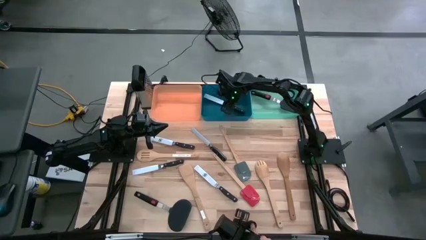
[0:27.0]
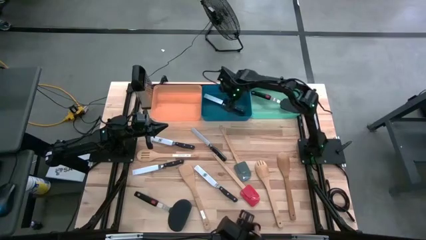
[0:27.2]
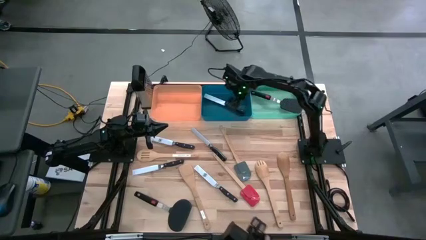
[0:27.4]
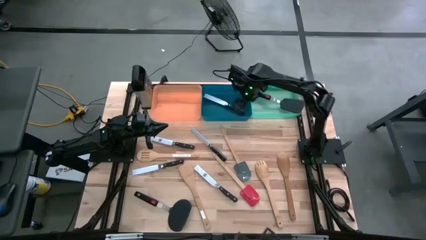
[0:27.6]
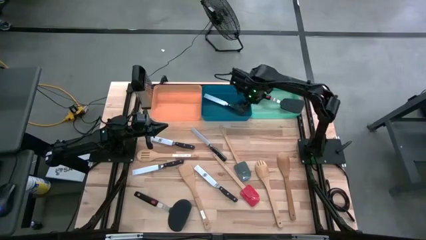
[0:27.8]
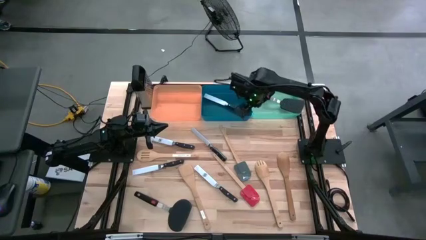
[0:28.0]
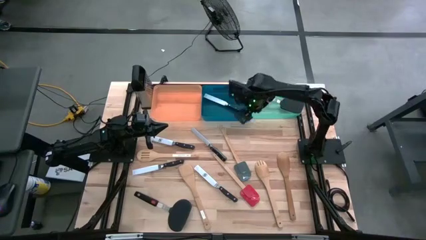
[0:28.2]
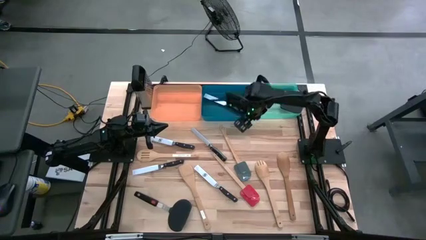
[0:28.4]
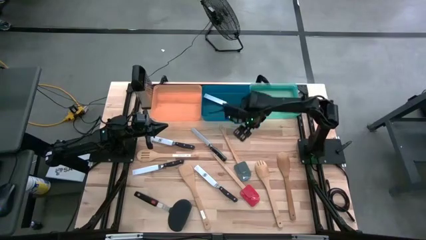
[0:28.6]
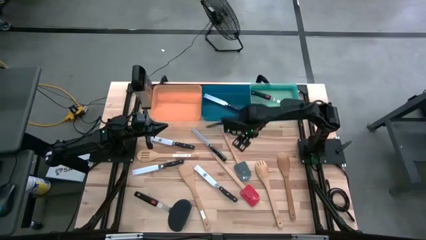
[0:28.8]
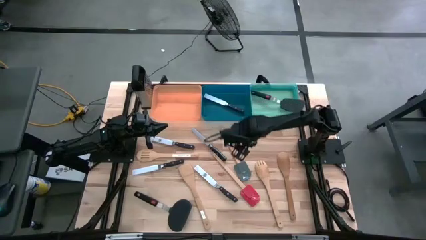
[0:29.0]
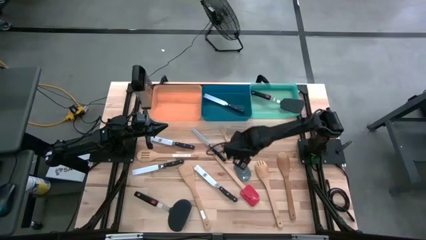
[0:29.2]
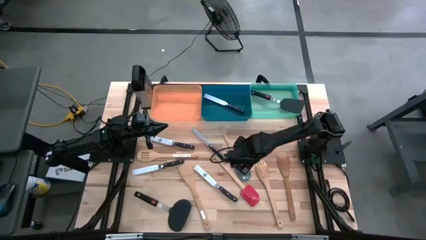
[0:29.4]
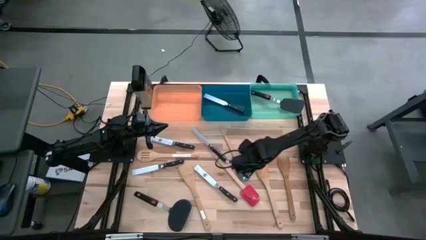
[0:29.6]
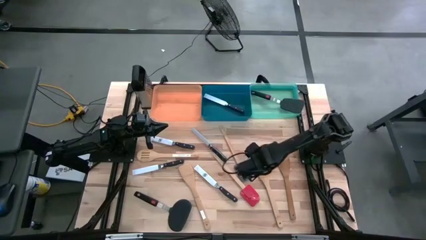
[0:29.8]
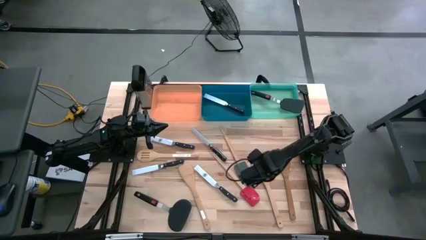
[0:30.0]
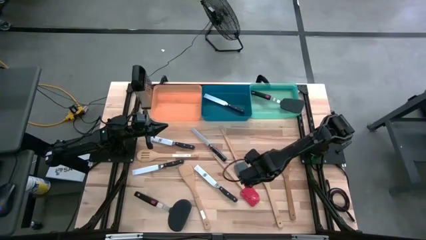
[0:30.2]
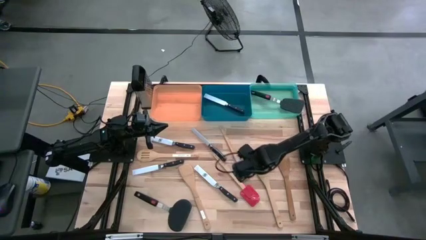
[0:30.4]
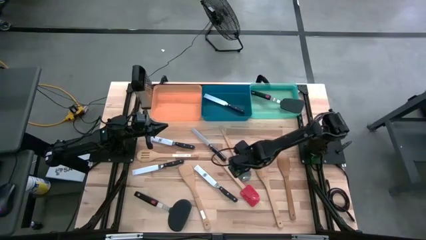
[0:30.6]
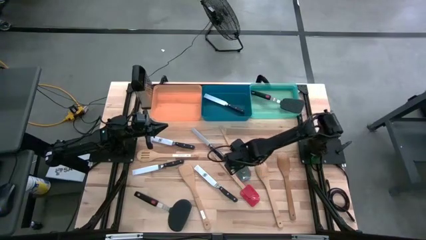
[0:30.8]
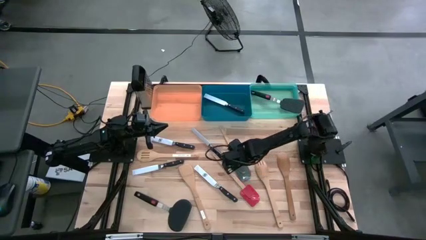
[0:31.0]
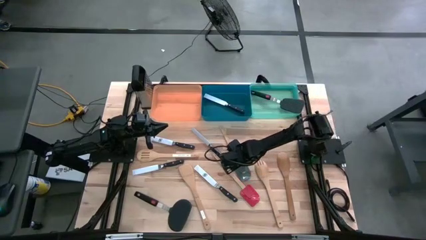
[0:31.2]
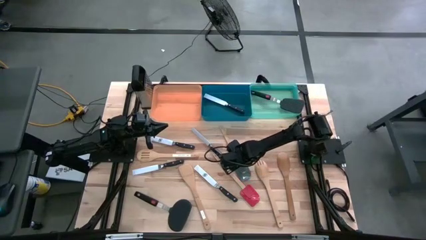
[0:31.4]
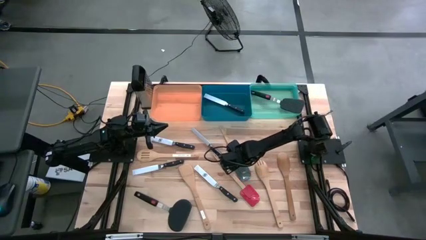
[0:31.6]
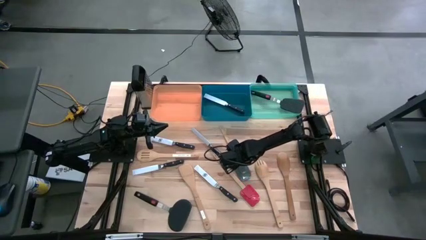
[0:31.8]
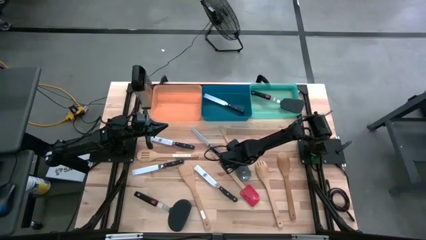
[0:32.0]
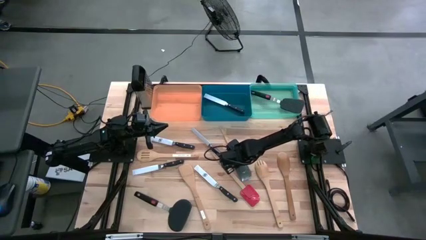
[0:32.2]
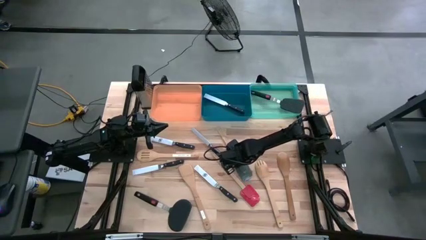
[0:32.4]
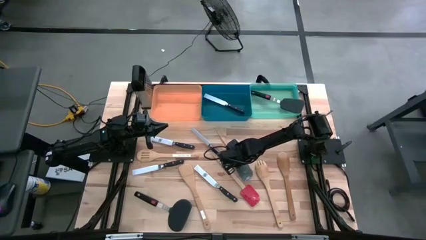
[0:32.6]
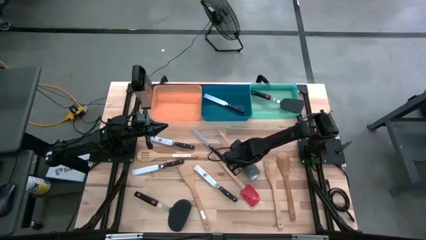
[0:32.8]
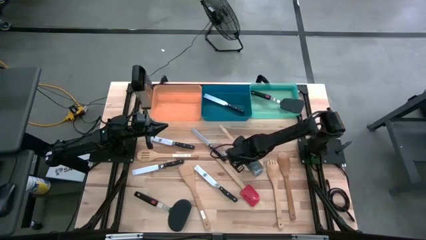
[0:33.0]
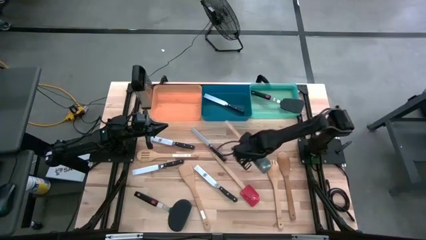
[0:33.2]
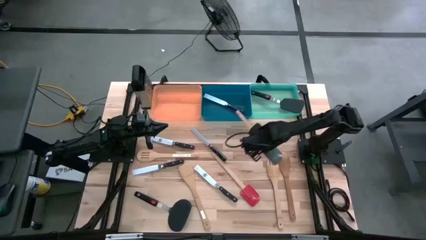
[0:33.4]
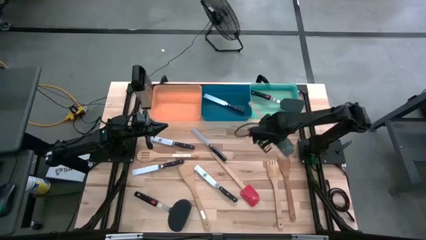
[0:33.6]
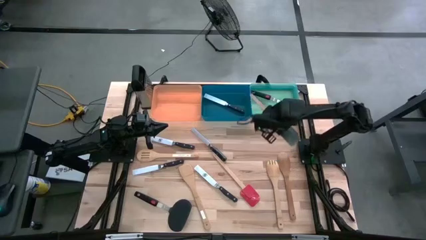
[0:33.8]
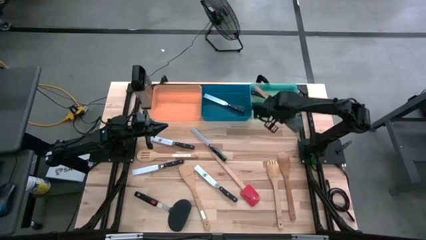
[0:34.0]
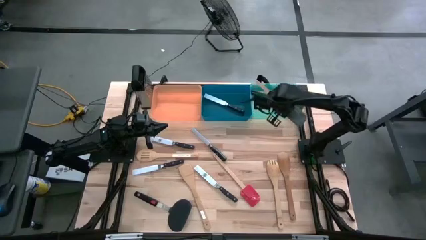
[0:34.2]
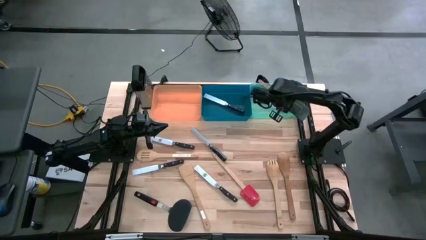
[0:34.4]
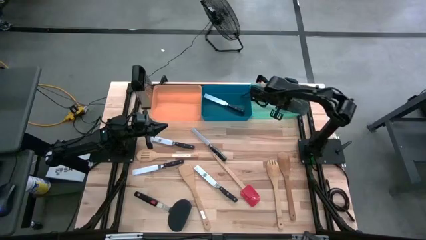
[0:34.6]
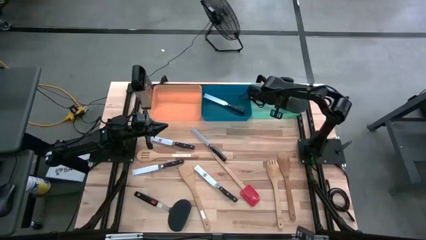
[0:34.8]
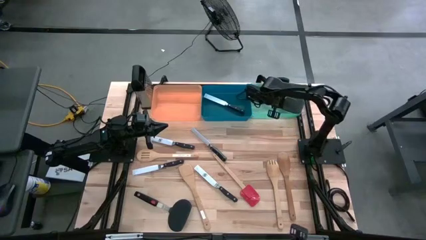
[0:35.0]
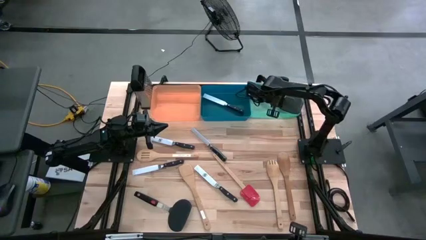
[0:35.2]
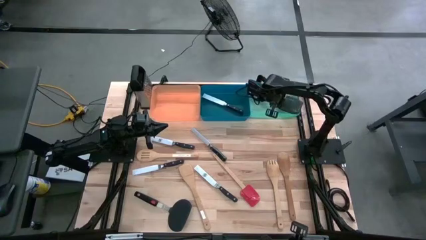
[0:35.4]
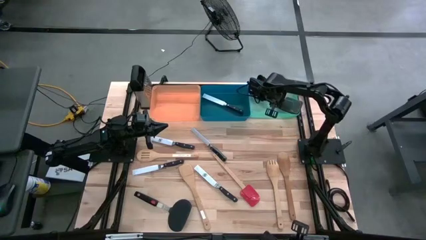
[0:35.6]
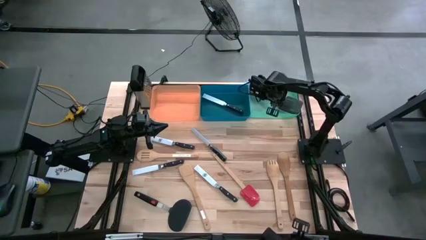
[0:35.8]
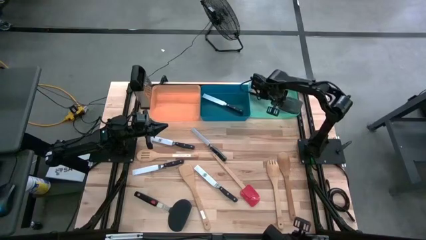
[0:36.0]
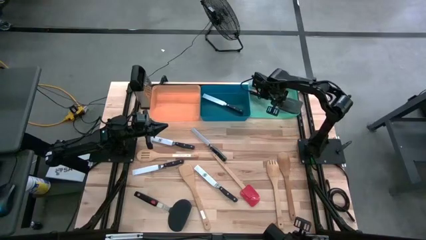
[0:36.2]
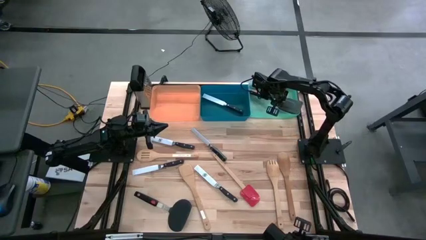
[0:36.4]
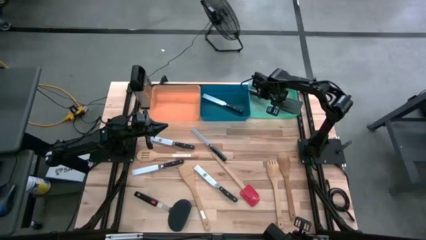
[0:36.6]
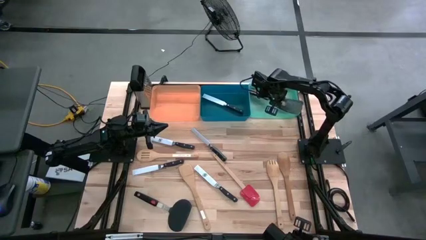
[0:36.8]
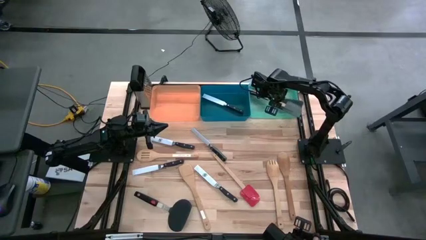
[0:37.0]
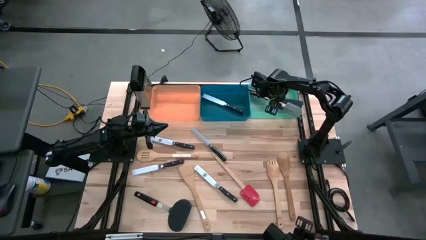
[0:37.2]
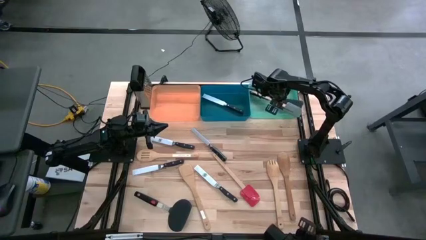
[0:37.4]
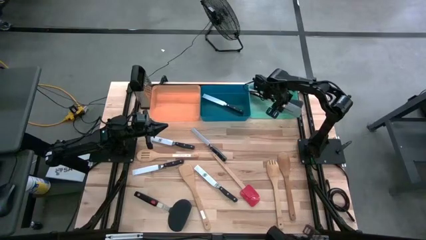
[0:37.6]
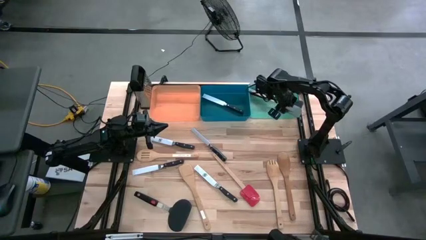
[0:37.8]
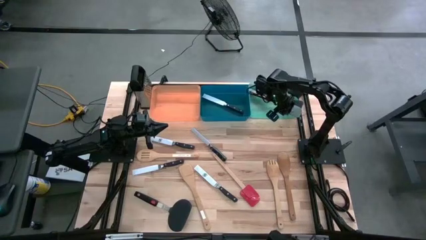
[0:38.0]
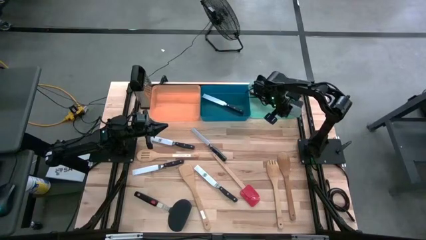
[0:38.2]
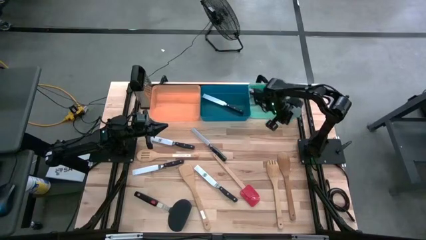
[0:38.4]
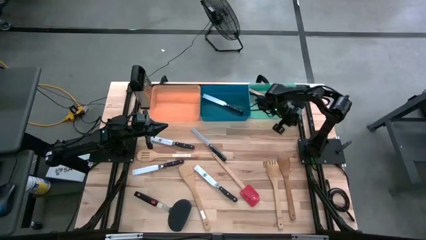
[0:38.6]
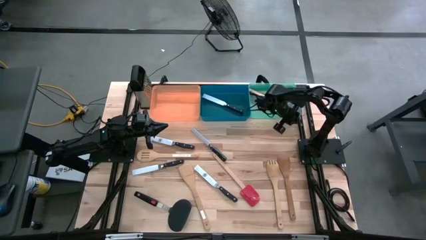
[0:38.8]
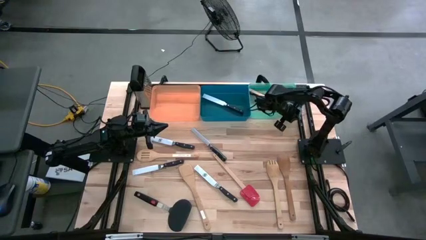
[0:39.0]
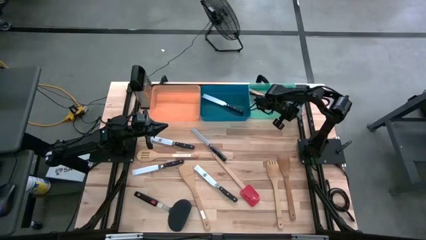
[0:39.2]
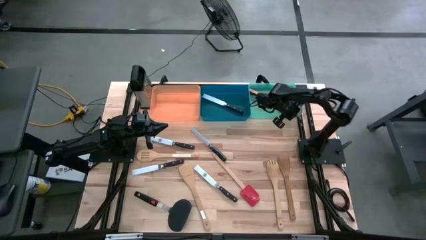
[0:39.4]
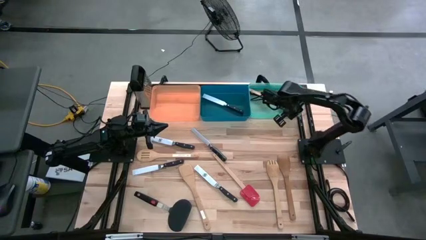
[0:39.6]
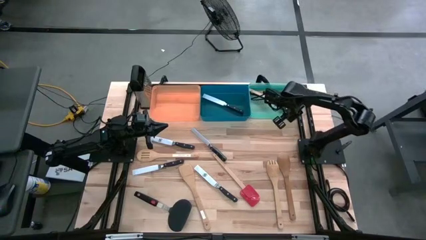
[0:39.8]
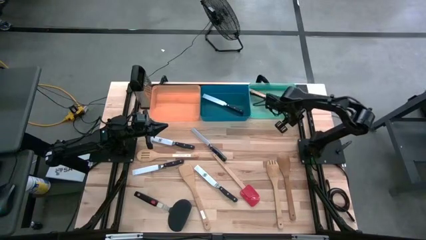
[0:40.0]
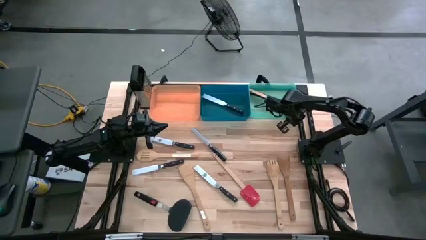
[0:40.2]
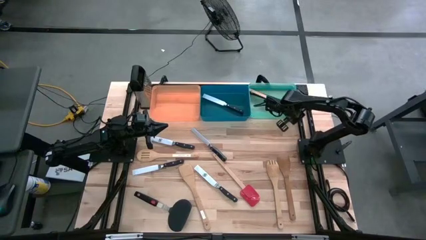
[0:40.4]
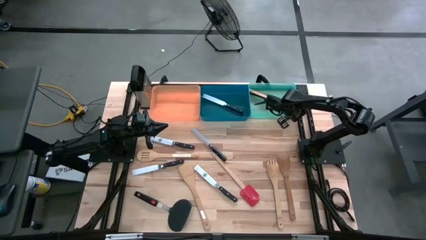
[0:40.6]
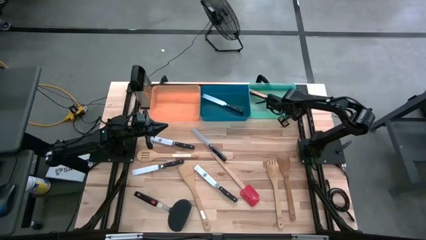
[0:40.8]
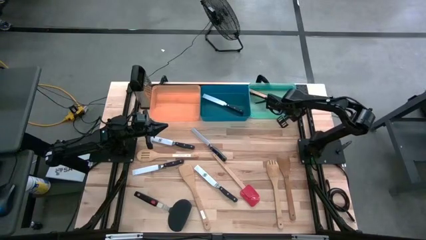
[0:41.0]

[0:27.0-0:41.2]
Task: Pick & Place Kitchen Items
Put the gray spatula into the green bin
